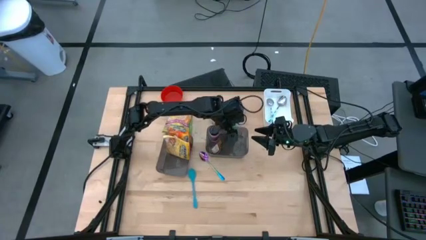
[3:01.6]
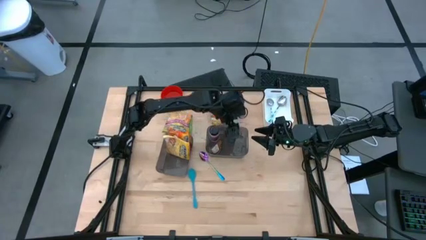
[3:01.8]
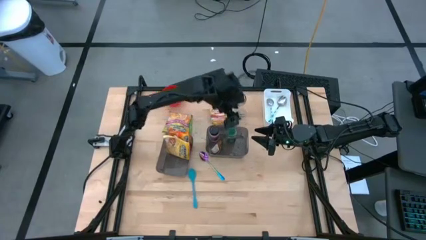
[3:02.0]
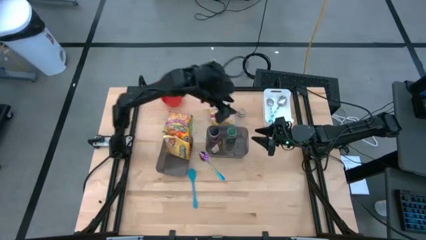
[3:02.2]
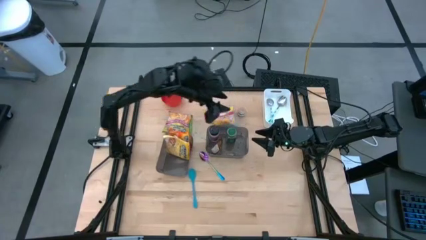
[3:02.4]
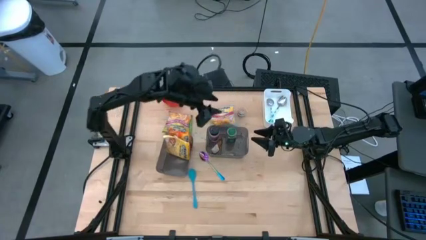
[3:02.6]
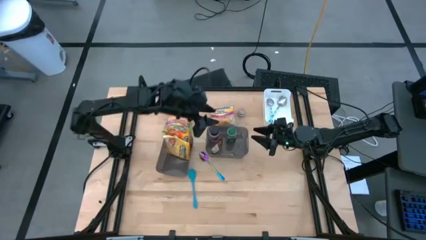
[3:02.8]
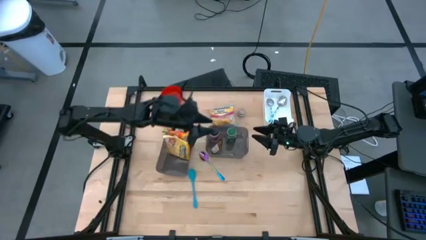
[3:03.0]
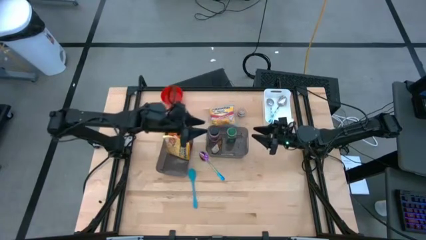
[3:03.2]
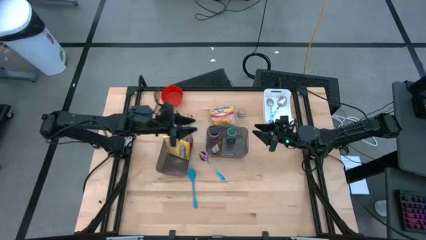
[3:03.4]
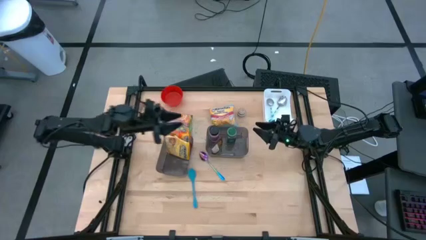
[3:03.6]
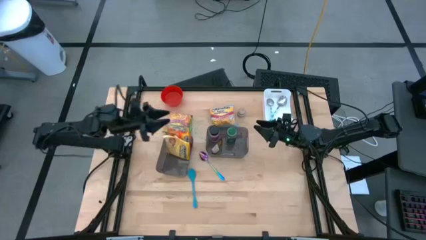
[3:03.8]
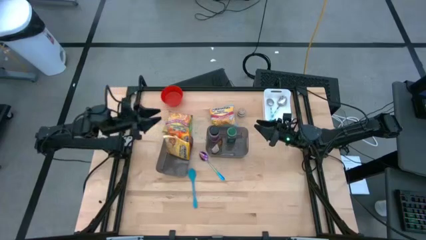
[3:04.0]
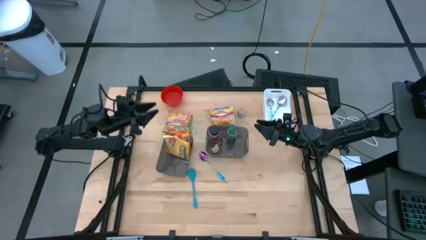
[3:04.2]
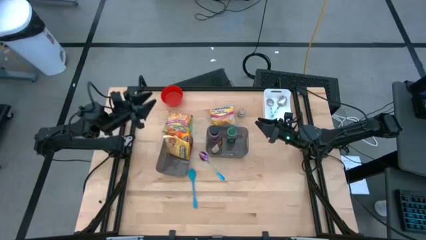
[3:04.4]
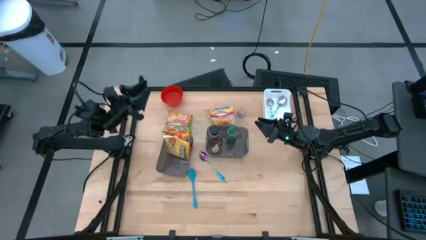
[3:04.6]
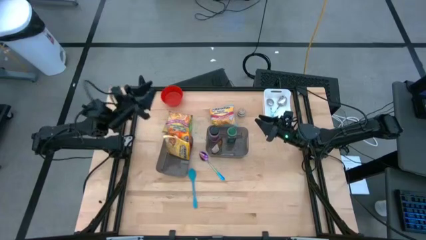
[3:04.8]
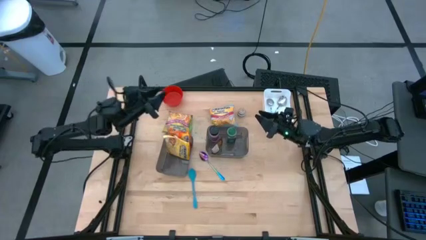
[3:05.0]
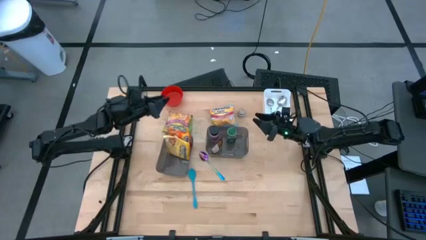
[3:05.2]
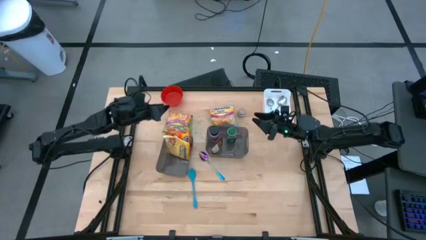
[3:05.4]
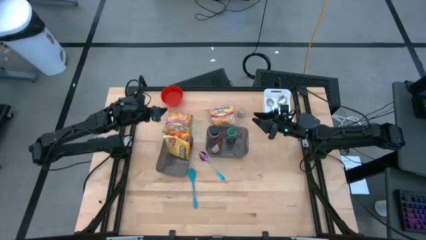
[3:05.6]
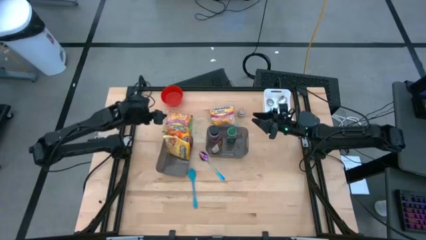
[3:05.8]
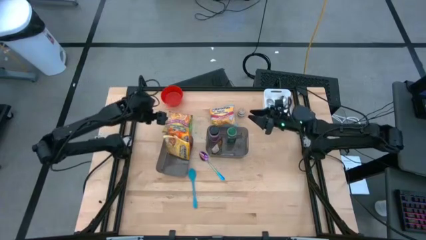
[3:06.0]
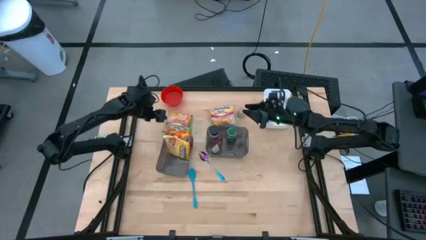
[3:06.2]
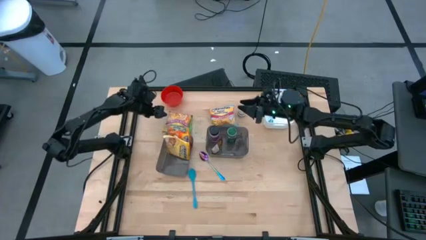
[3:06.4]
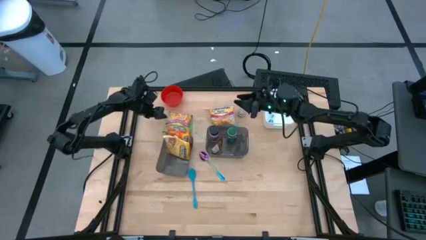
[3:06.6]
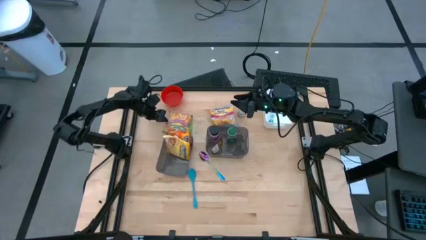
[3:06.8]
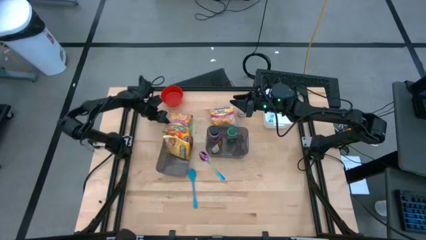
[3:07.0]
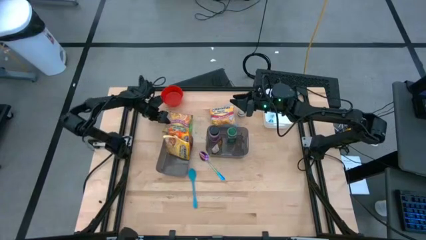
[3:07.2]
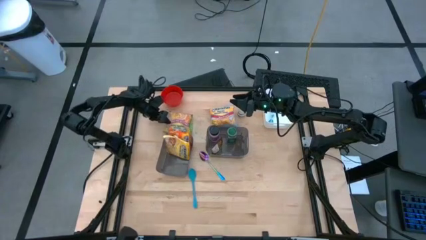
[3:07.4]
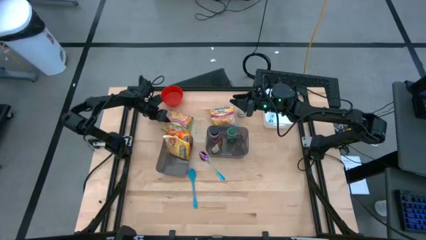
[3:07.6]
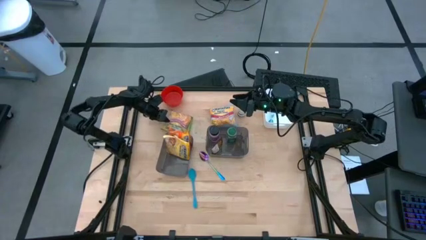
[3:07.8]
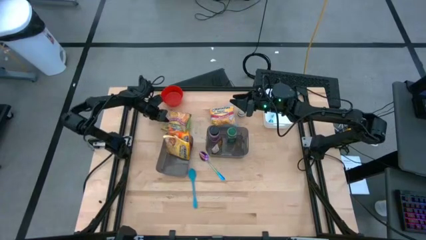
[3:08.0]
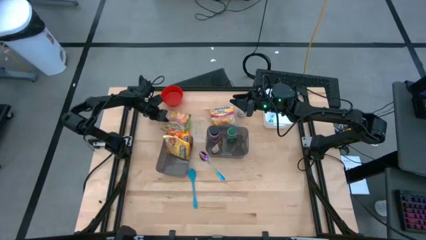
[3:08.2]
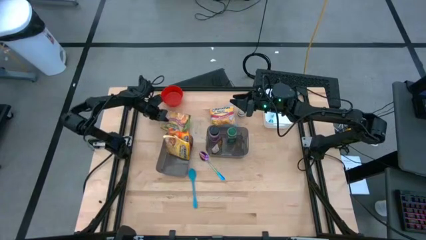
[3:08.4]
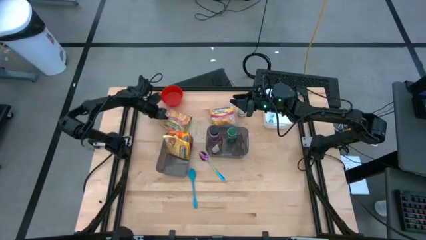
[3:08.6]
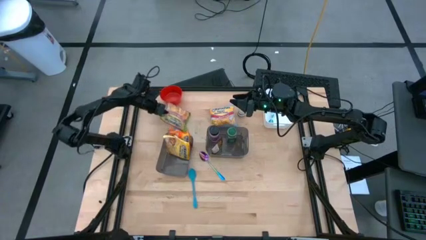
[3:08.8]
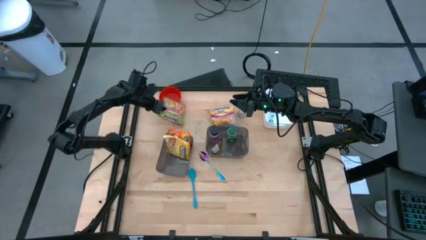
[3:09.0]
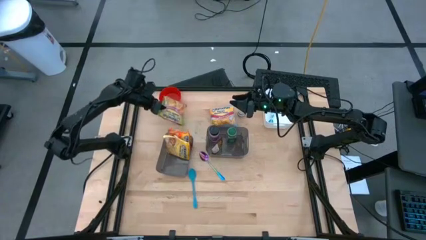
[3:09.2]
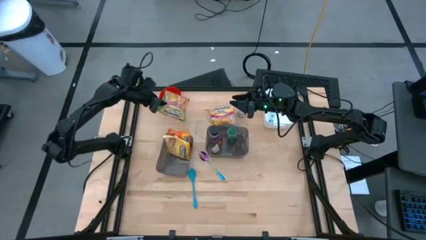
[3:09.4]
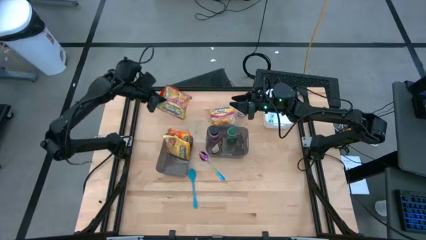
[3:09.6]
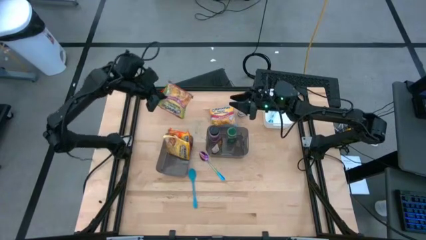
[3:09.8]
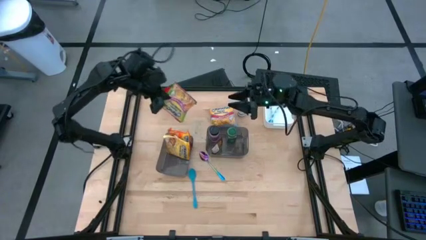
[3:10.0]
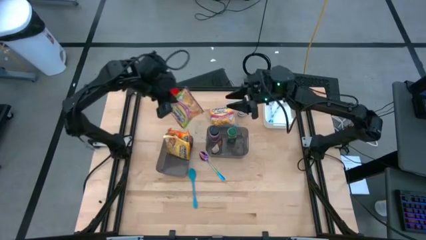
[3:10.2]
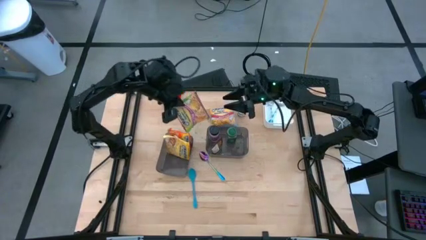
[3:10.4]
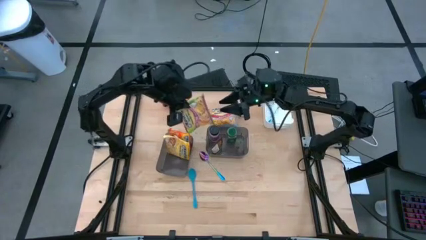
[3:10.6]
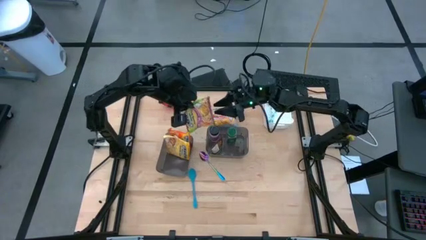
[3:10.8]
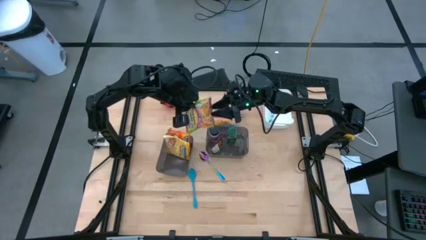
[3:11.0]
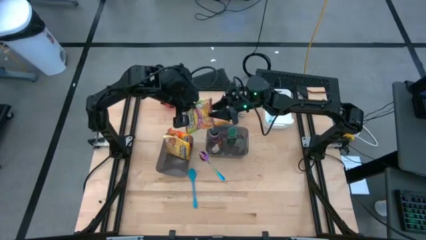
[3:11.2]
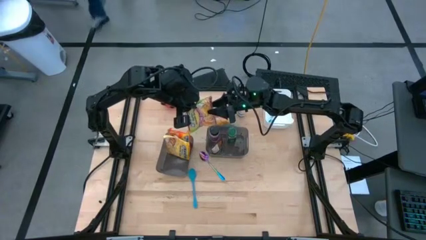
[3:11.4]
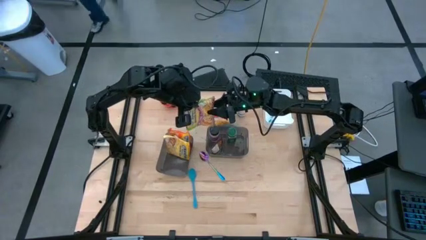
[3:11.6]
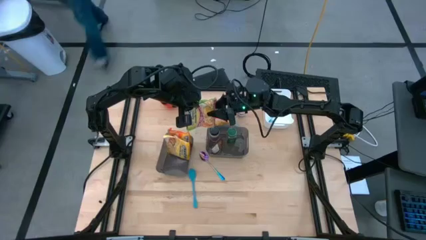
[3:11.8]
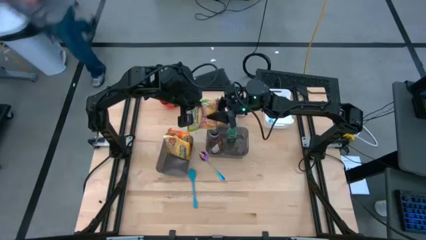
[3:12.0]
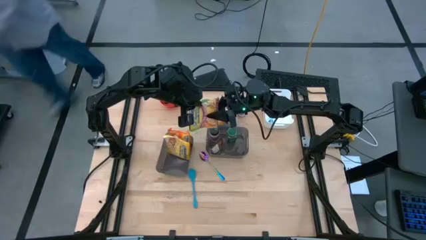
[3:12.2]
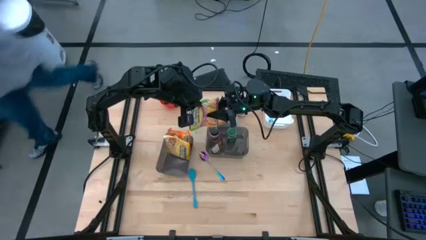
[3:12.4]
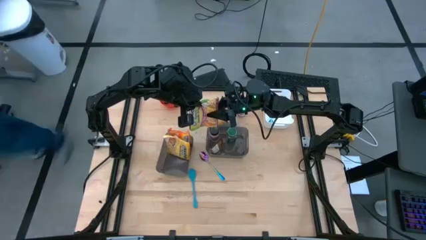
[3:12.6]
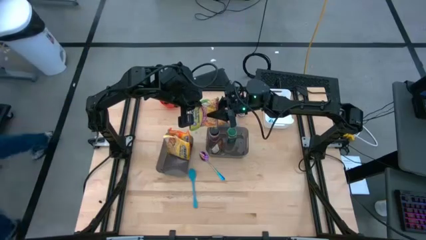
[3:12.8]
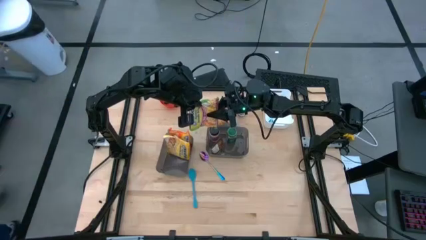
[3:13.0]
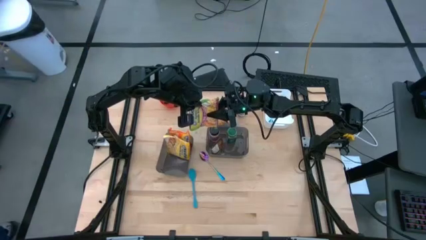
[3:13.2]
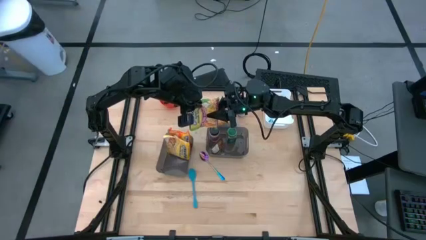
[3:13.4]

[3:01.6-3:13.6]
Task: Pick & Place Food Item
Put the green noodle pack into the left black bin
